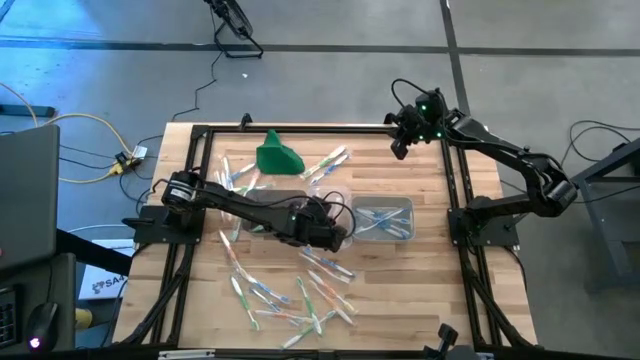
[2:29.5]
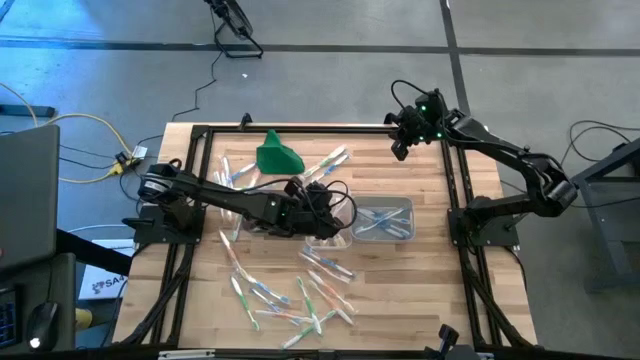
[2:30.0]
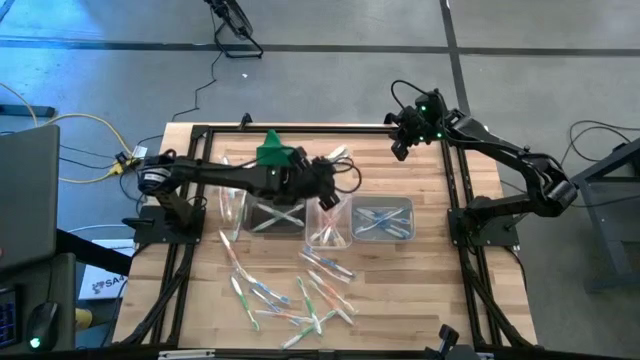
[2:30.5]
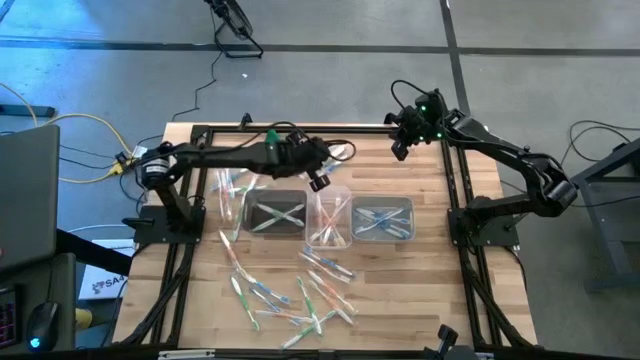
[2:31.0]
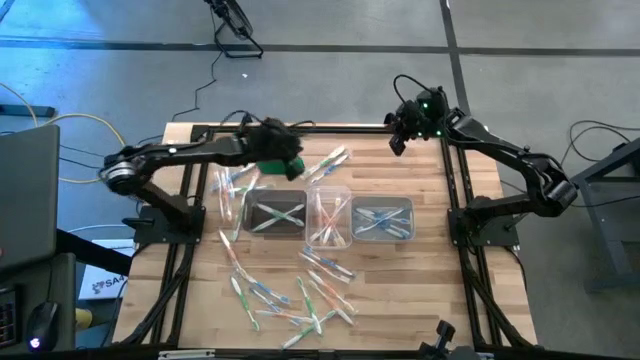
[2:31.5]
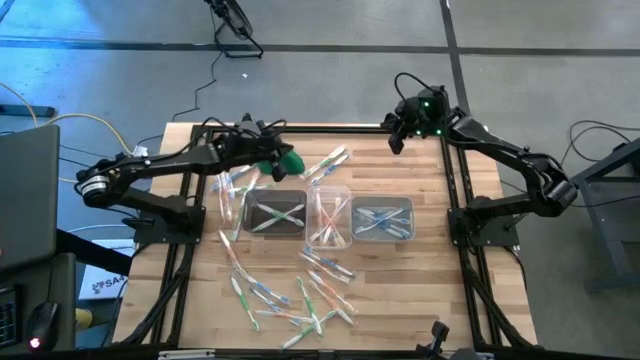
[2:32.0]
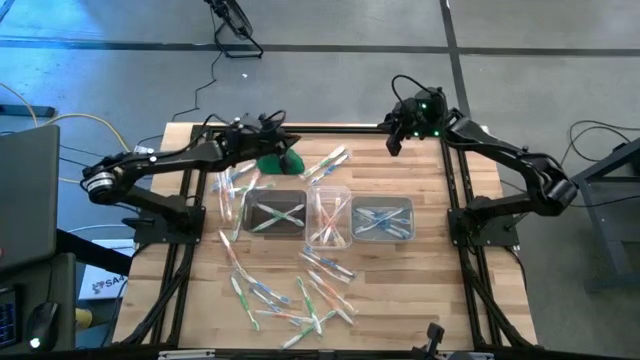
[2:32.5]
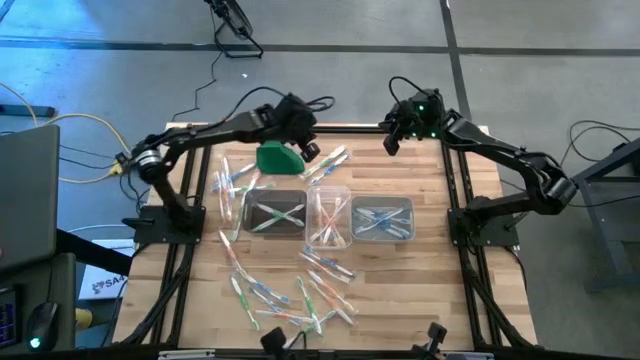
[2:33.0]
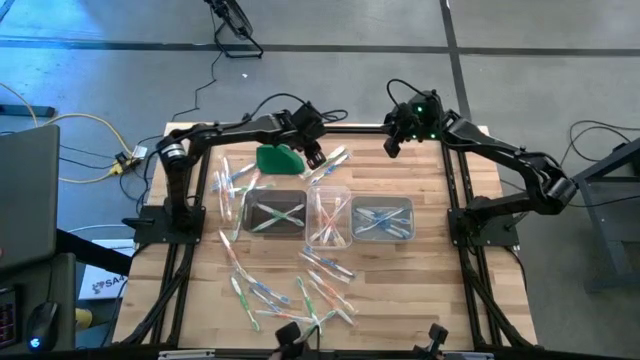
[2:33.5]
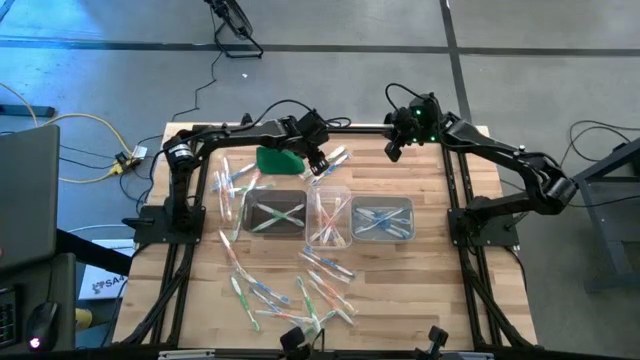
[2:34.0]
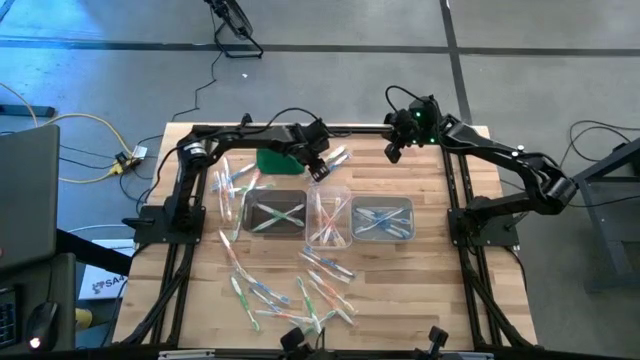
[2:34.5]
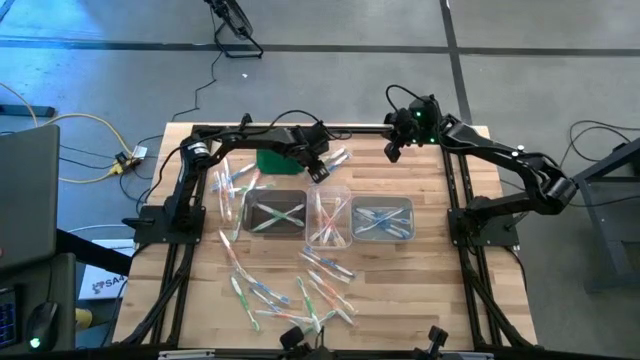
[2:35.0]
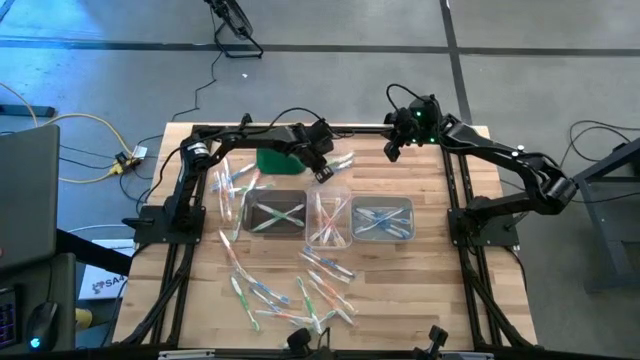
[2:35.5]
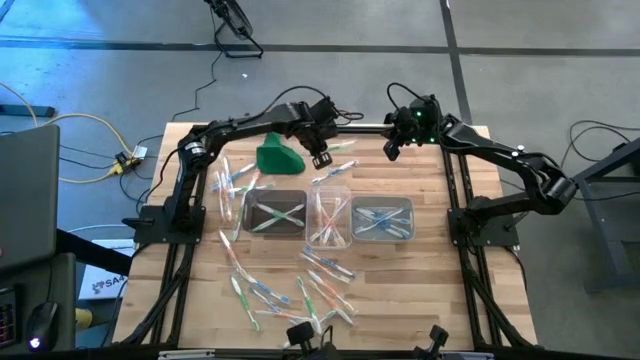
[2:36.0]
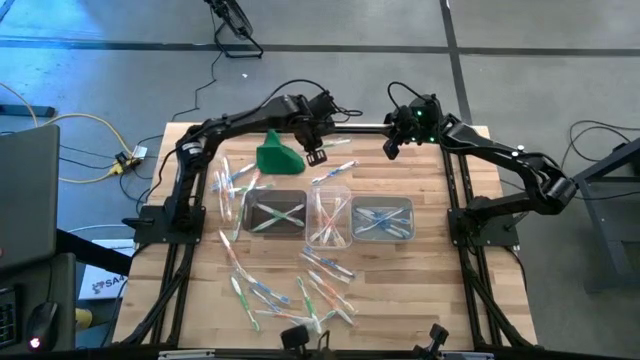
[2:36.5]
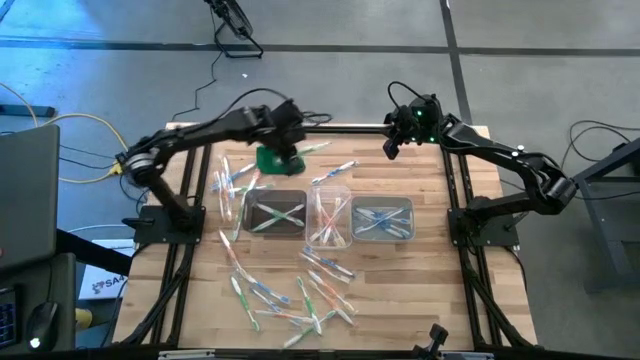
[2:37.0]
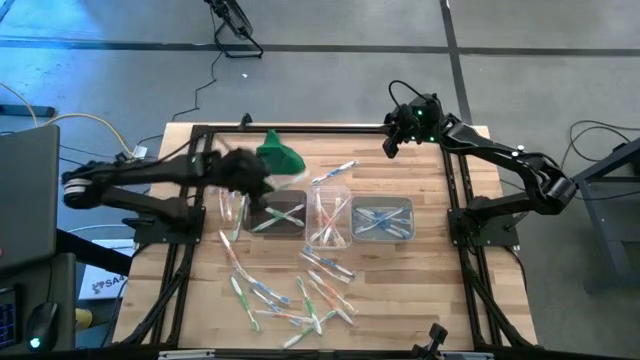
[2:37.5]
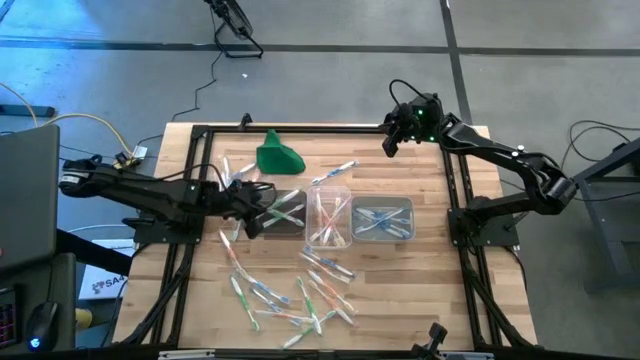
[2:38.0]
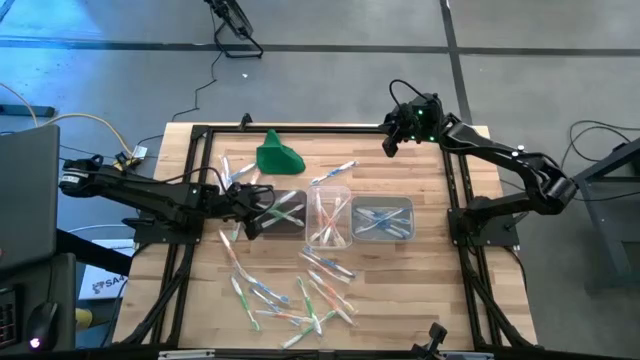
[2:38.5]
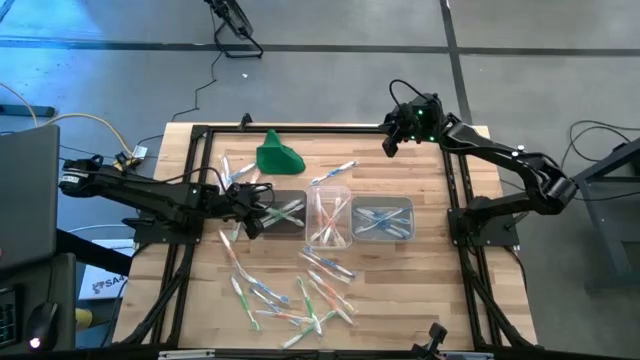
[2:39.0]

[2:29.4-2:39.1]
Task: Pick & Place Toothbrushes
Put the green toothbrush into the black bin

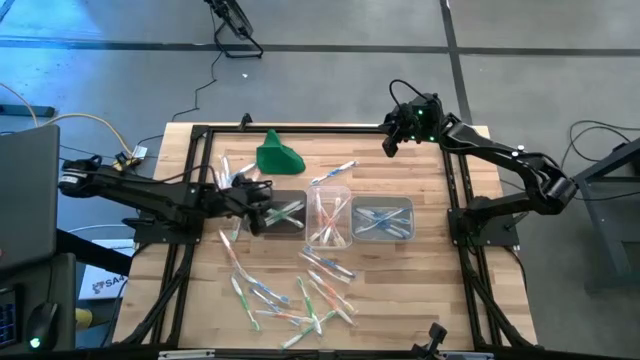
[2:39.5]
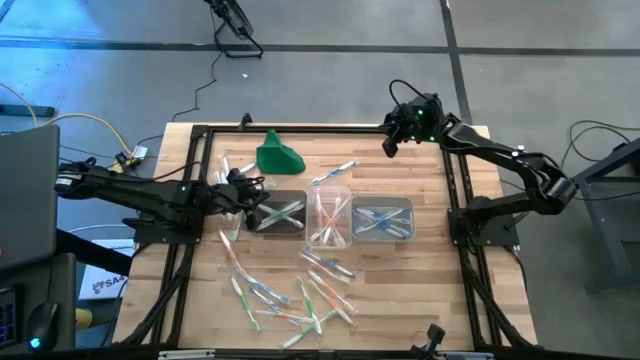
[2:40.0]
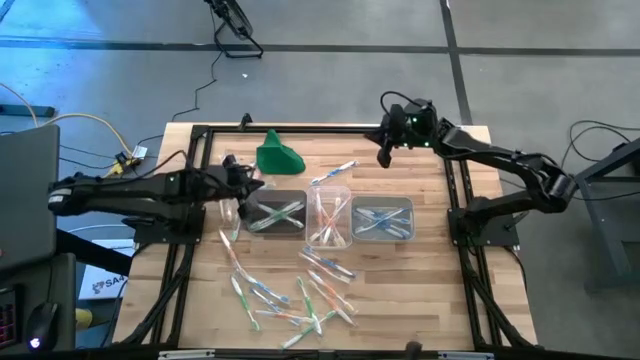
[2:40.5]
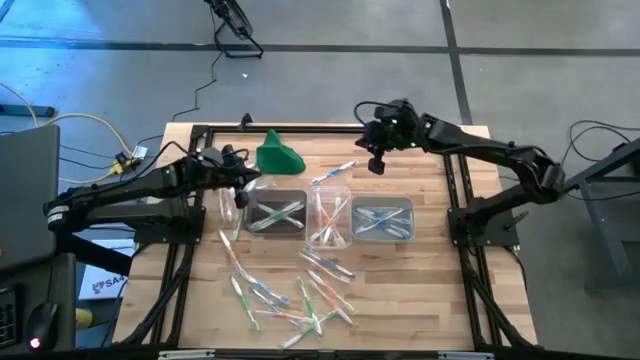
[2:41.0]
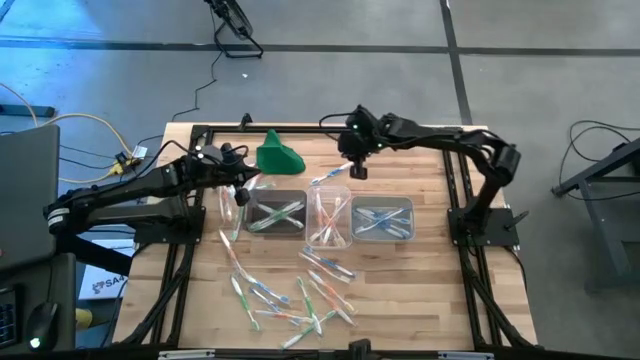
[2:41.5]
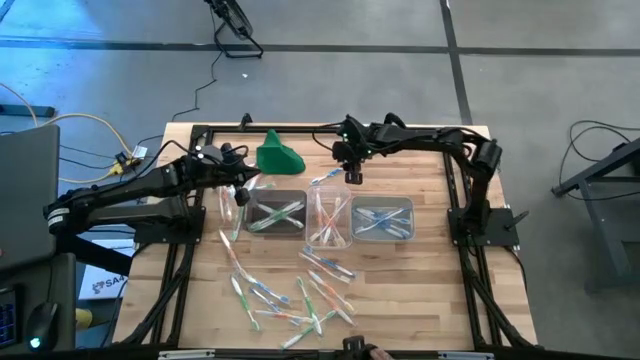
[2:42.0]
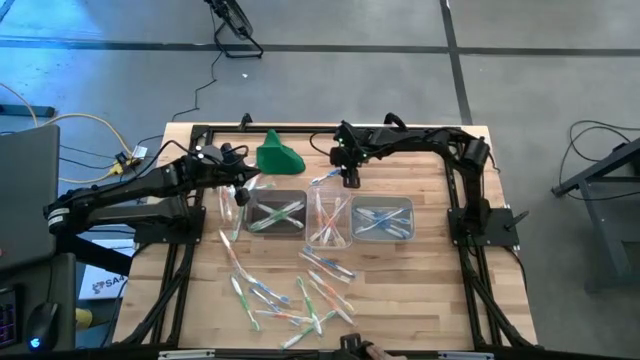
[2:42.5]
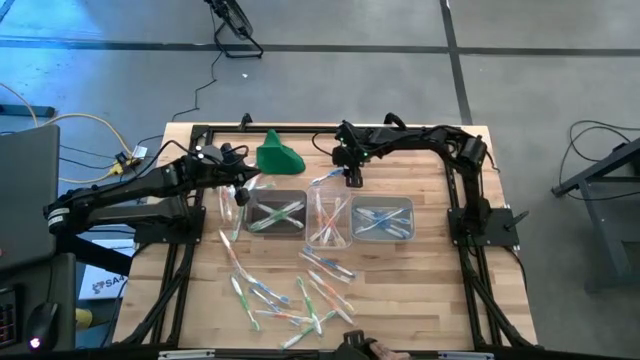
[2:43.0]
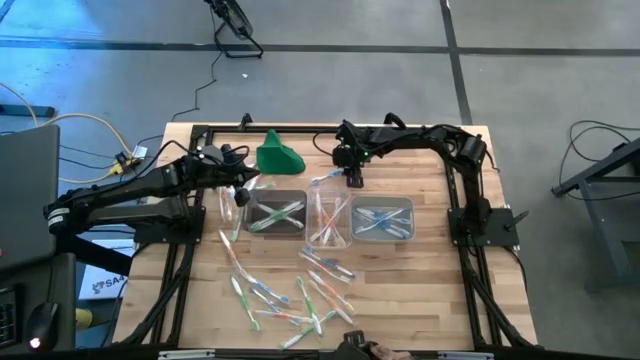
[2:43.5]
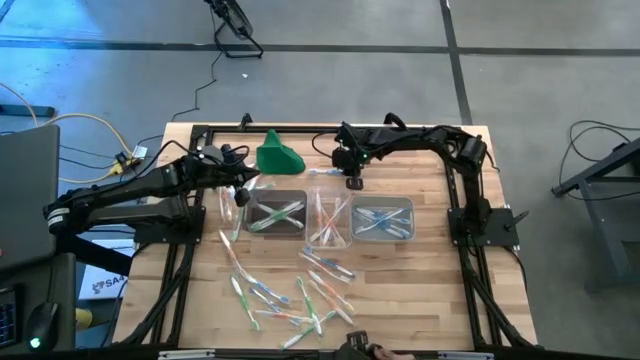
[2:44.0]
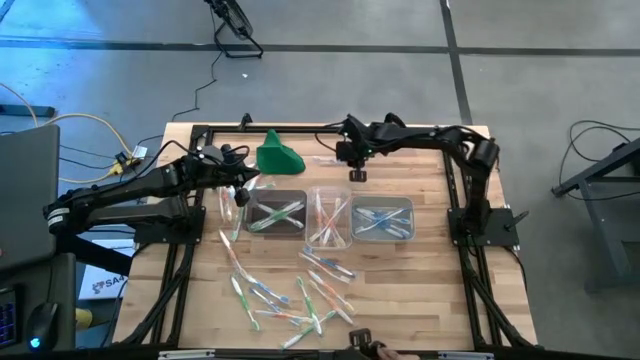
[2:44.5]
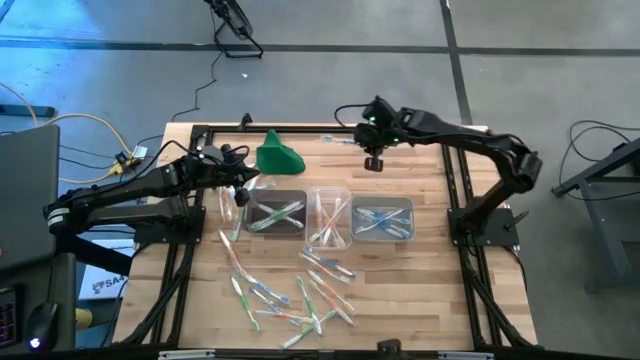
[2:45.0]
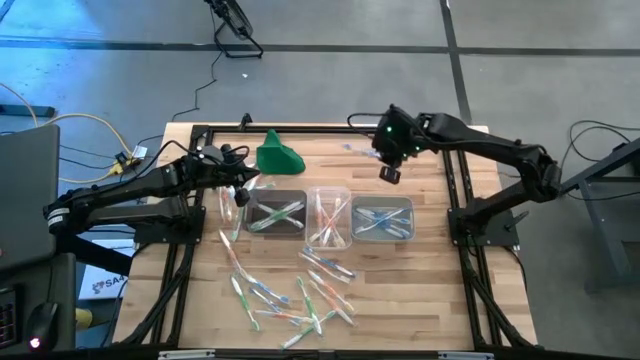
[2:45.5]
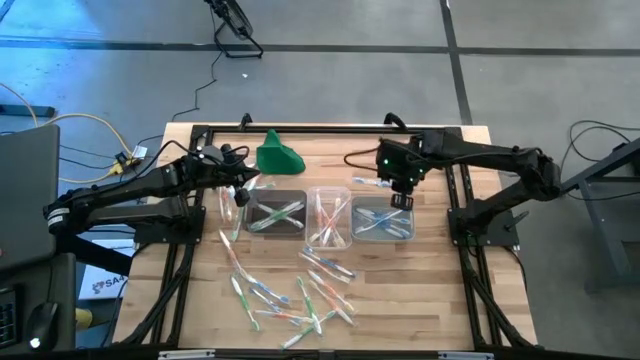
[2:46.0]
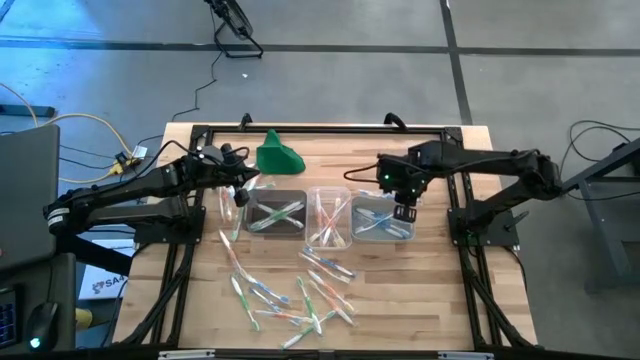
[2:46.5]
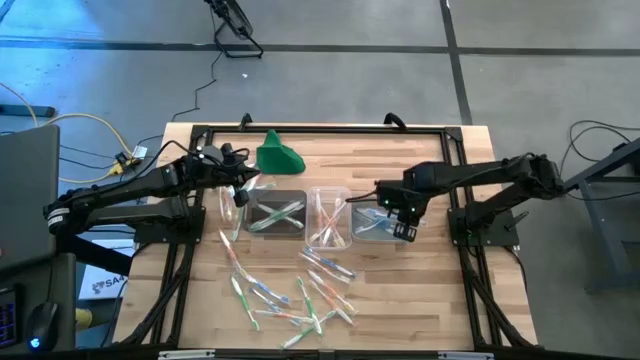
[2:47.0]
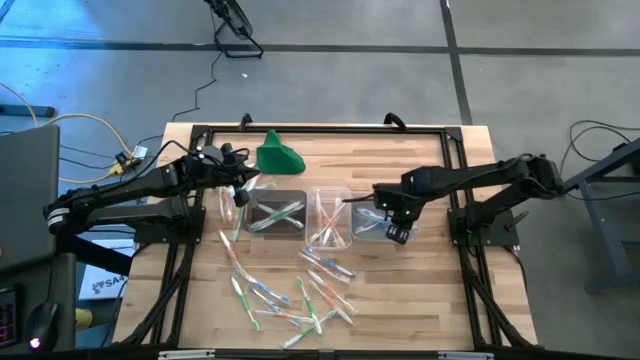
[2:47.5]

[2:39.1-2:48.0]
Put the blue toothbrush into the gray bin

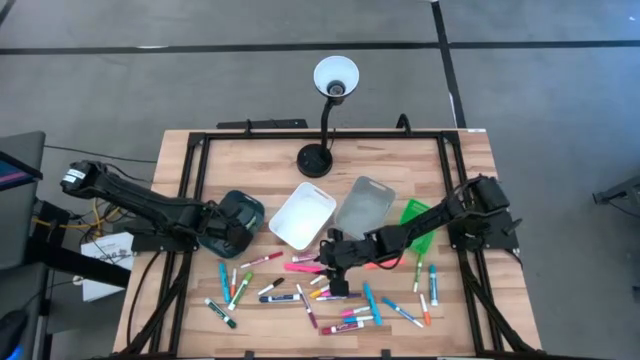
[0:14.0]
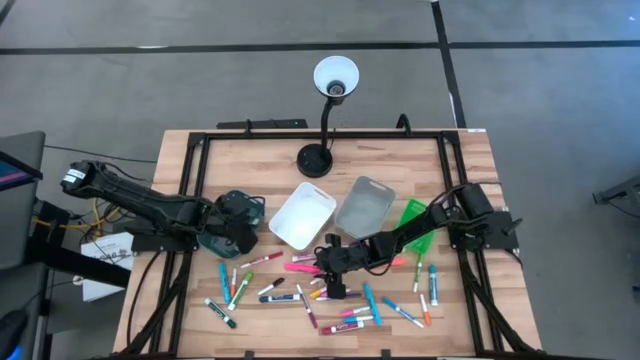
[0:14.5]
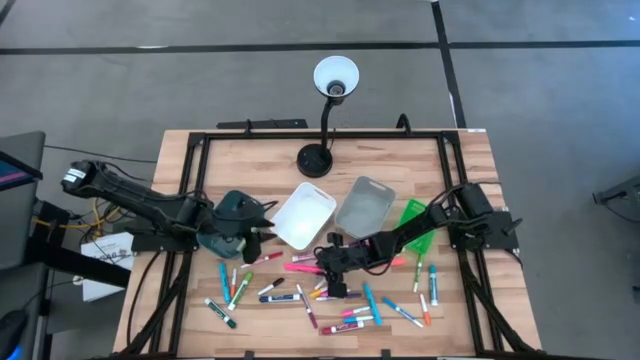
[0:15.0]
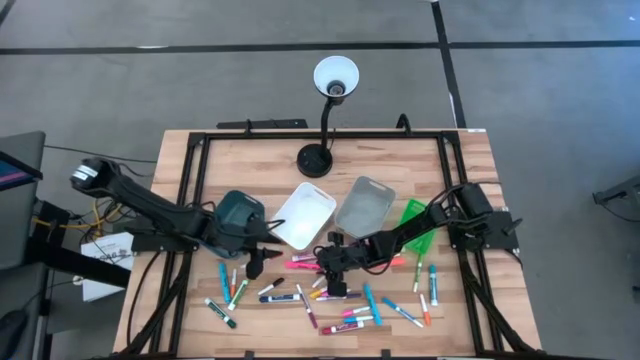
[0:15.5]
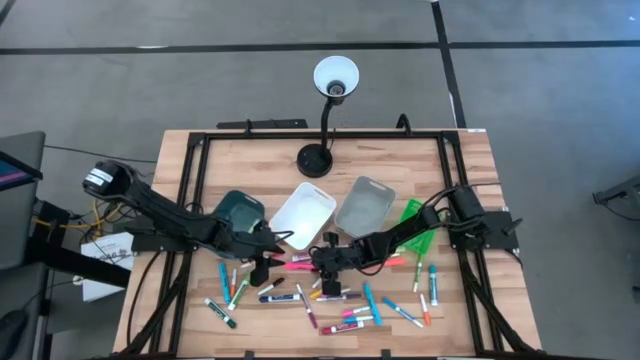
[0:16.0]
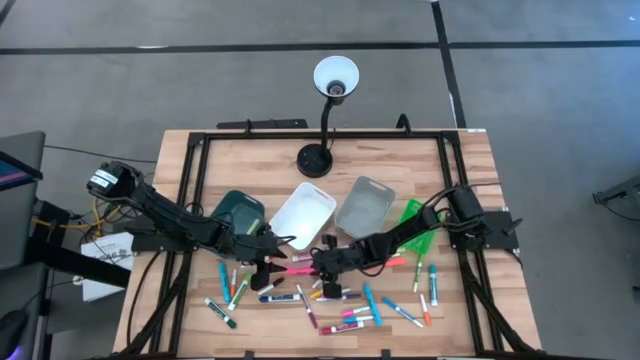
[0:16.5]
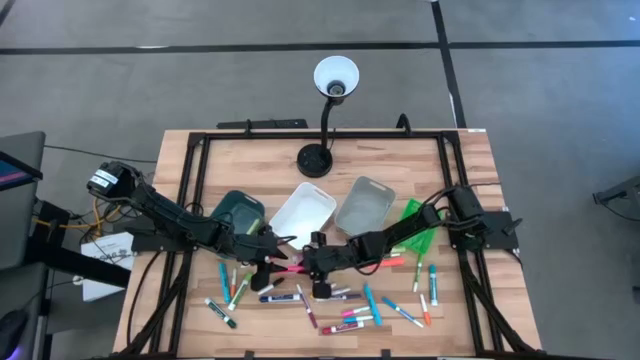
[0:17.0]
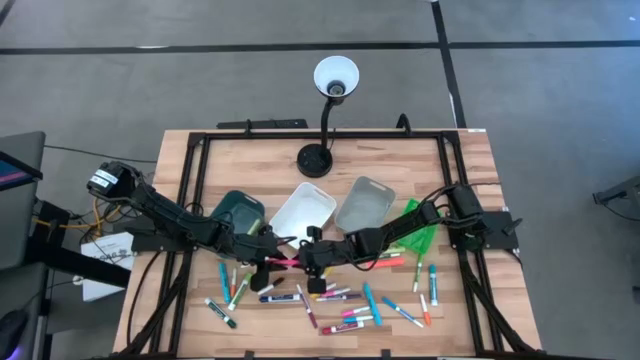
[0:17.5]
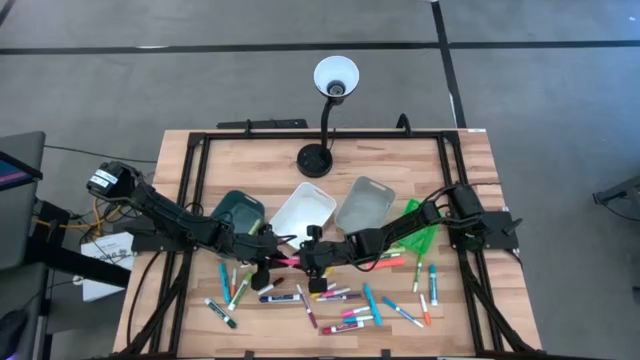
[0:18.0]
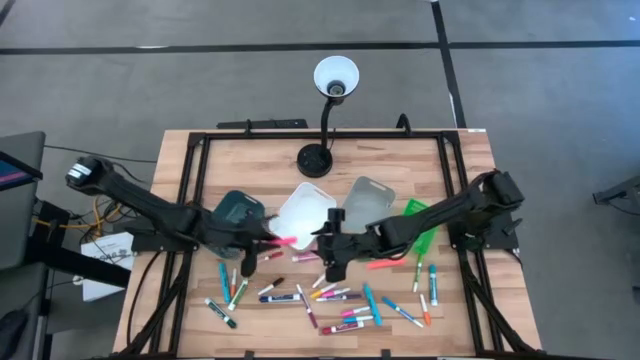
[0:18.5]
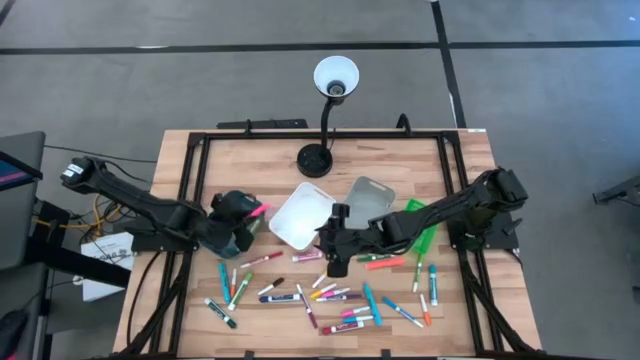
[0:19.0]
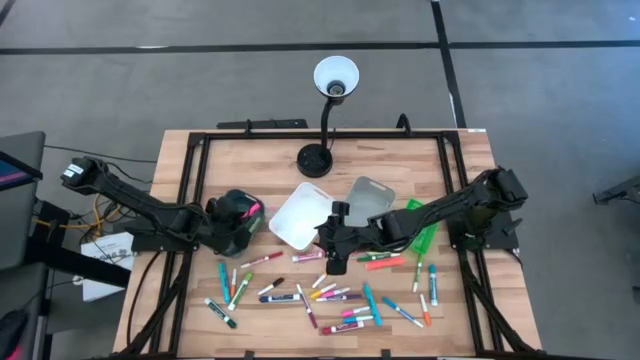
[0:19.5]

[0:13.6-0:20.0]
Task: Pick & Place Markers
Put the left pink highlighter into the blue bin
